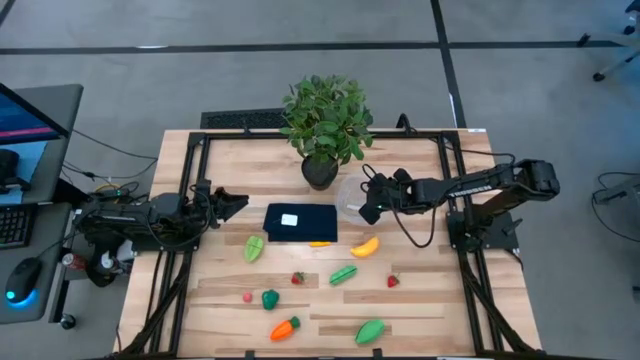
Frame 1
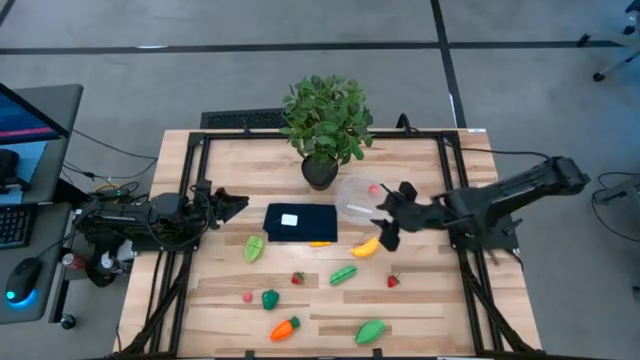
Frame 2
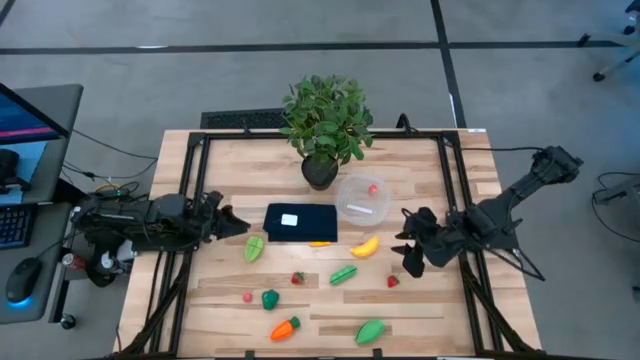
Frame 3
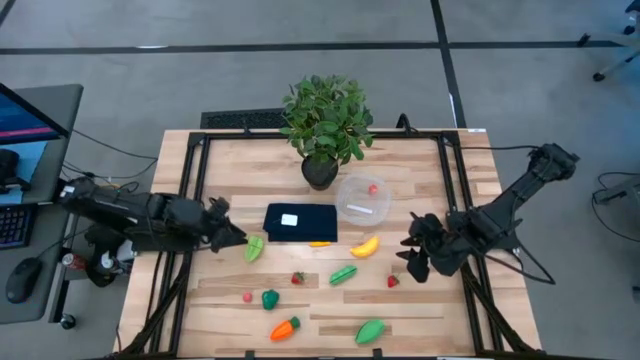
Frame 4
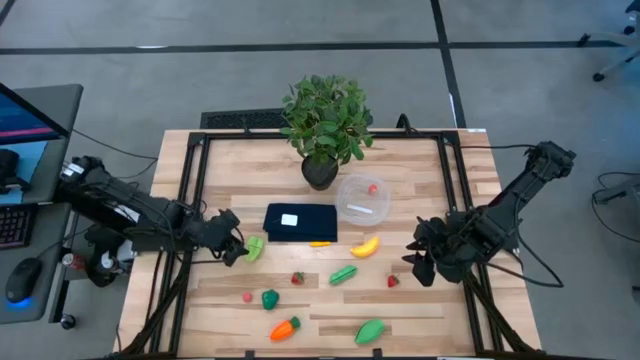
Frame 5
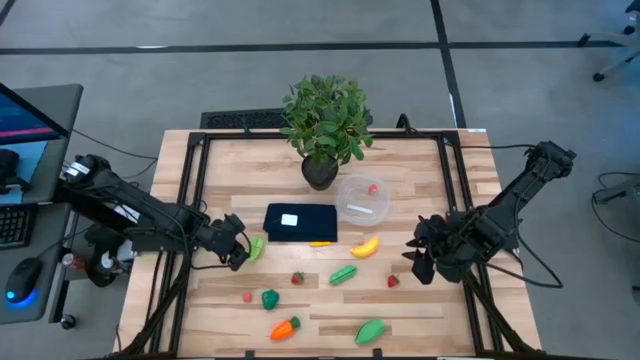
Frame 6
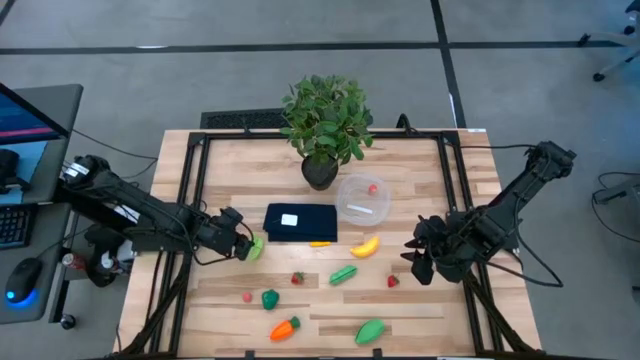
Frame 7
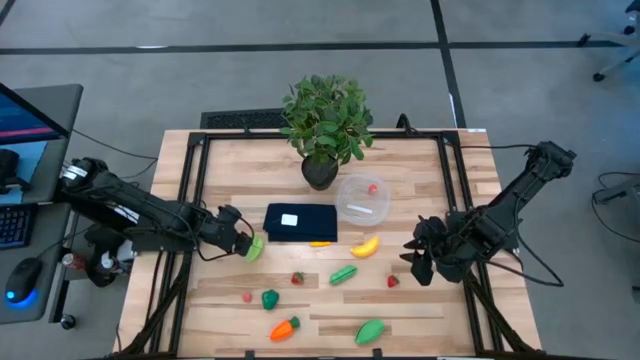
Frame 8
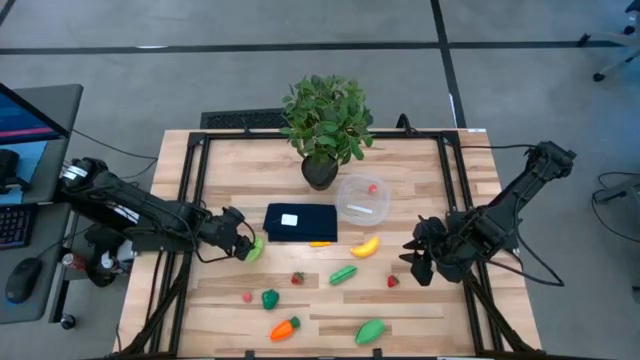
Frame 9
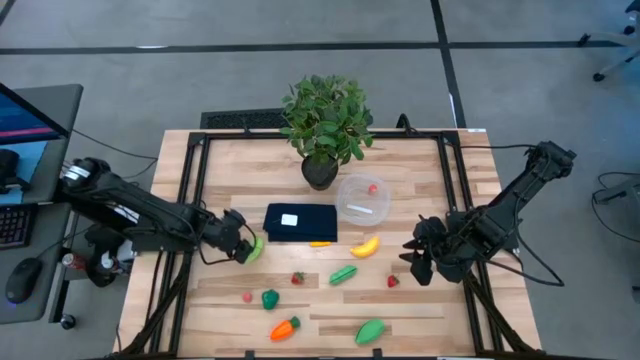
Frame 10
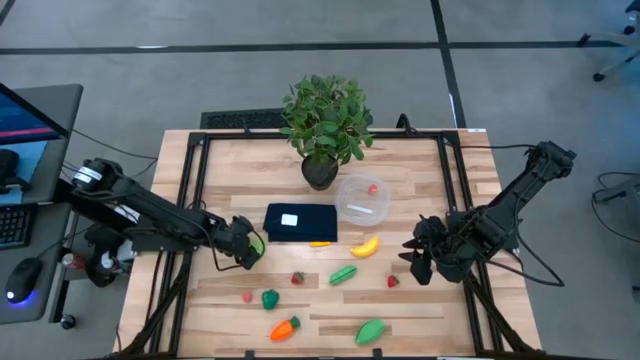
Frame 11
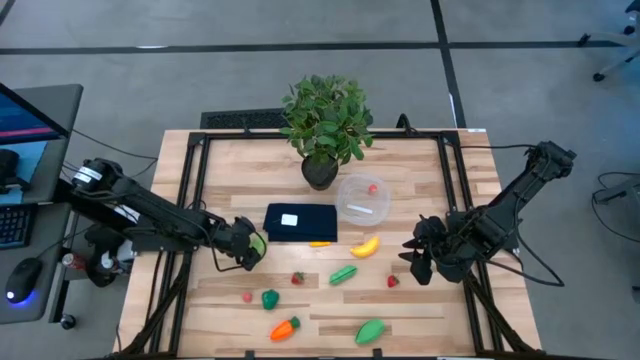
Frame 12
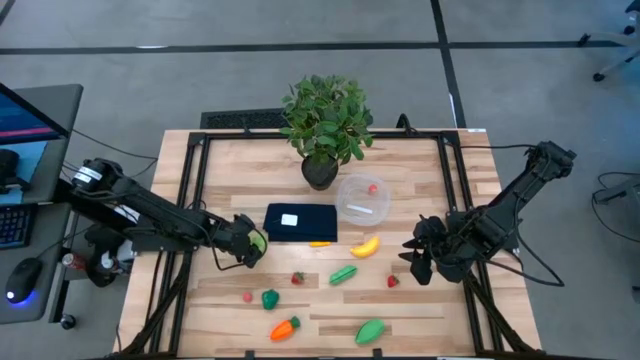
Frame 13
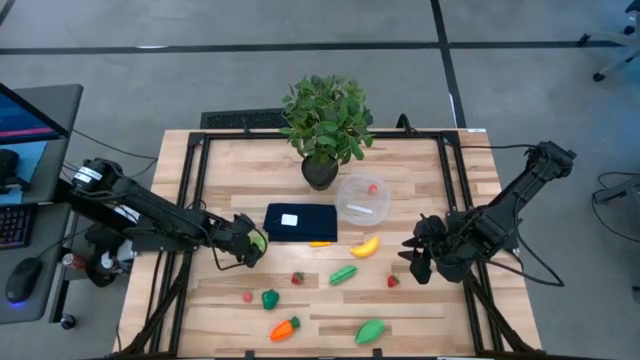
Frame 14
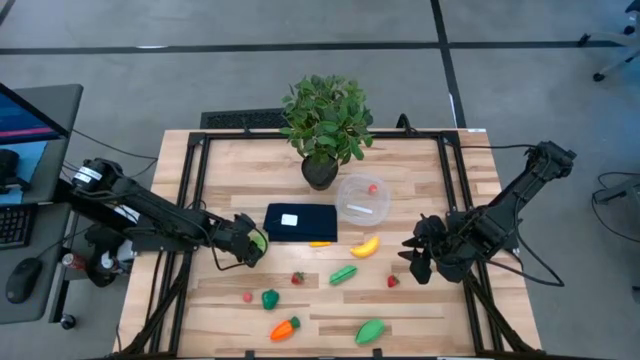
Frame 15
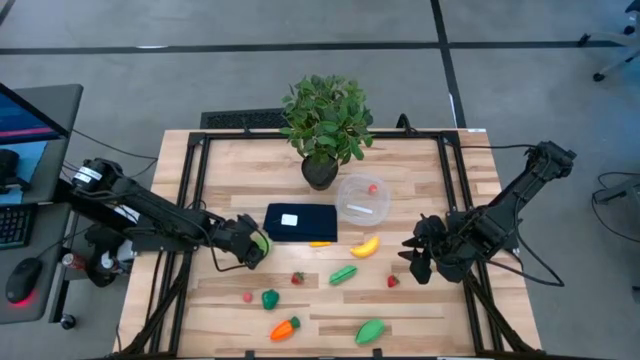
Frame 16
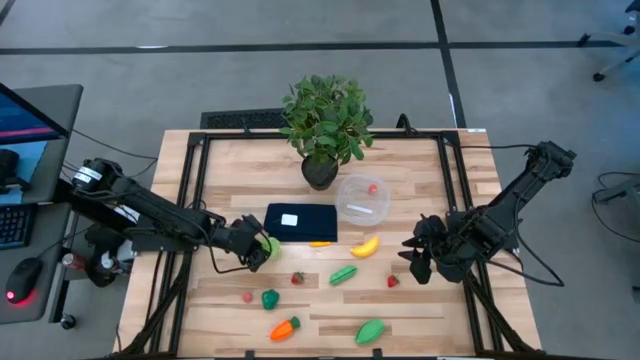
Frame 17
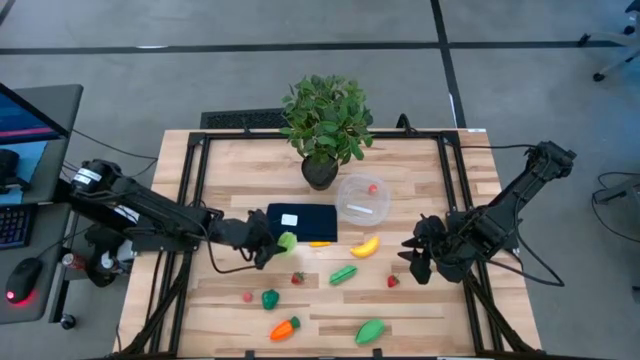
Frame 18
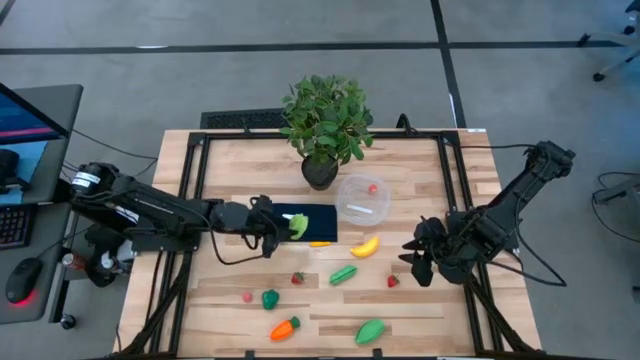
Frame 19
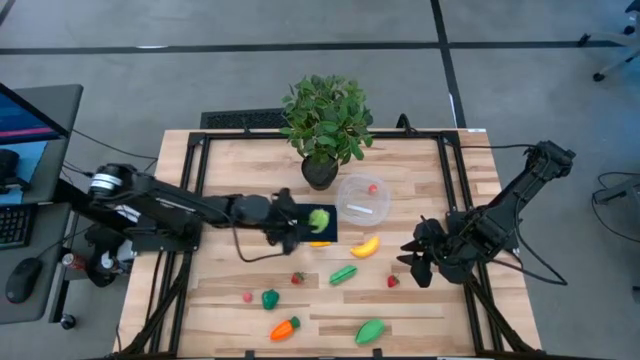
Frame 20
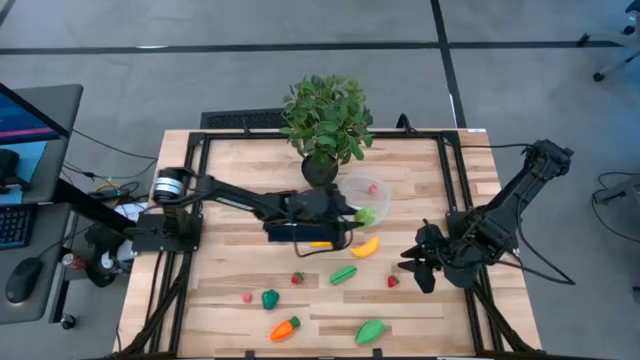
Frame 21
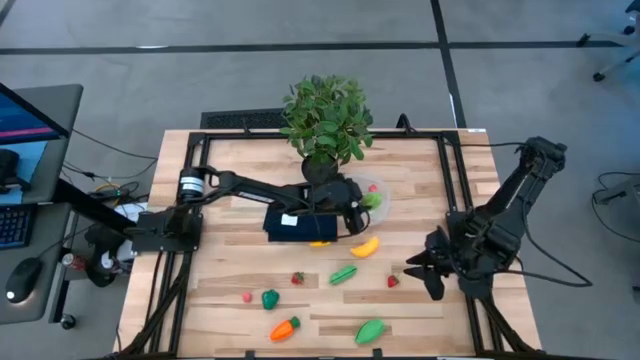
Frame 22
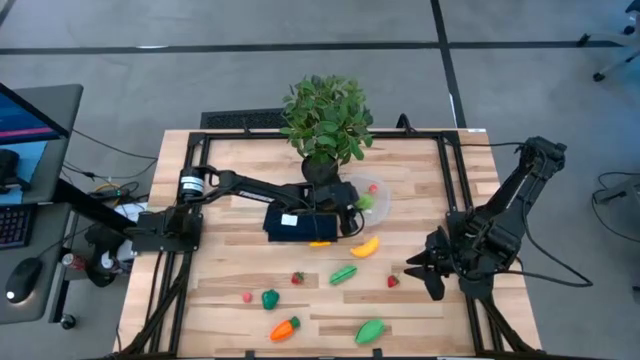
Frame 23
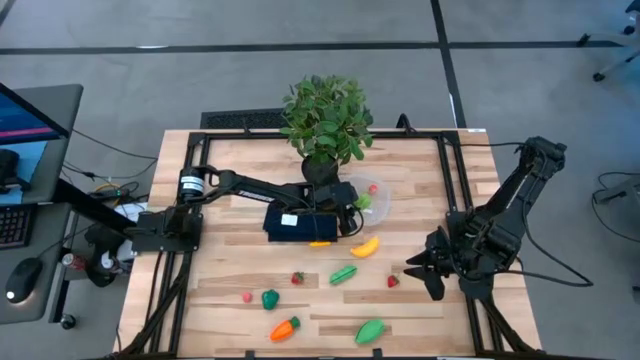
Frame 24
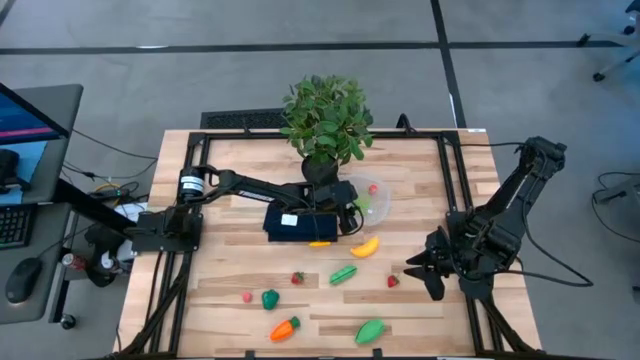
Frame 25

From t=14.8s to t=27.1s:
Task: Pick and placing Produce into tupperware
Put the green star fruit into the transparent container

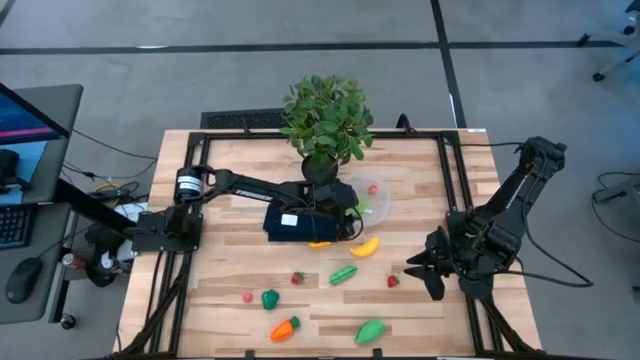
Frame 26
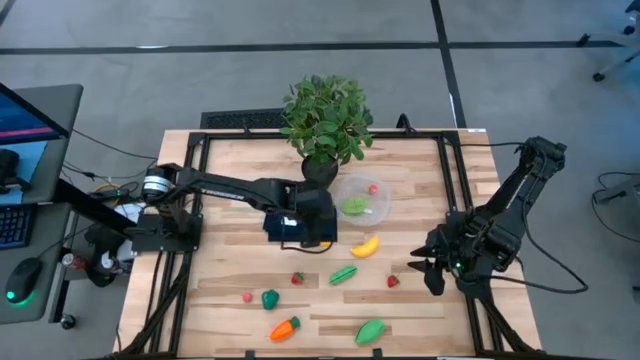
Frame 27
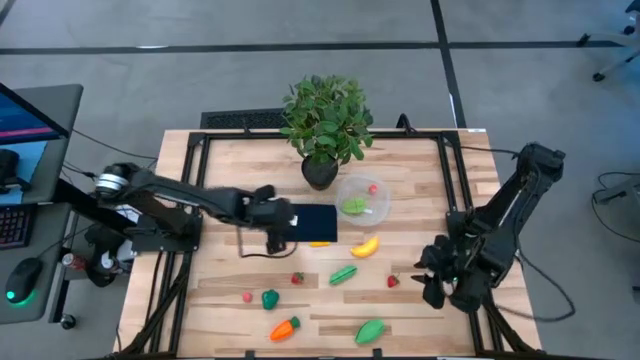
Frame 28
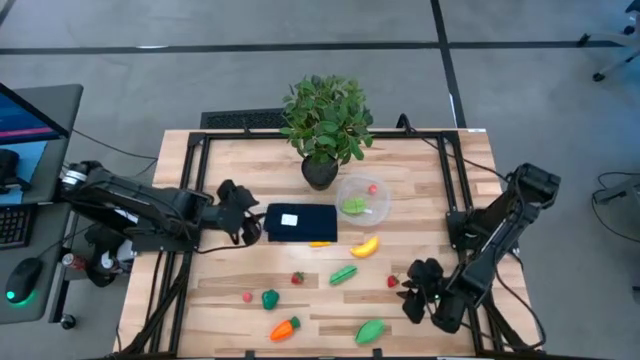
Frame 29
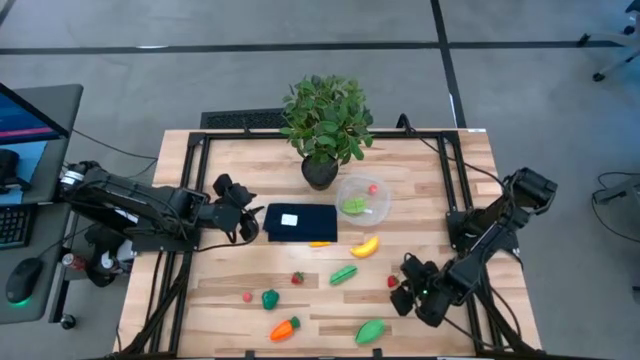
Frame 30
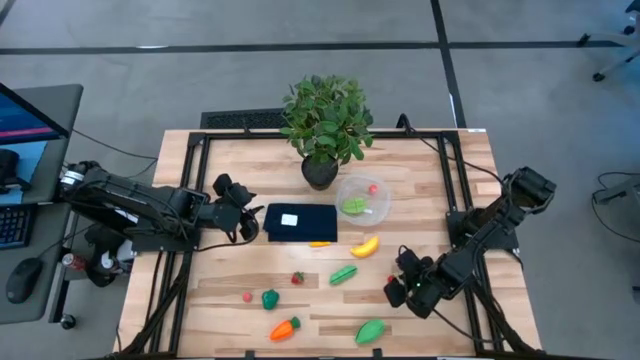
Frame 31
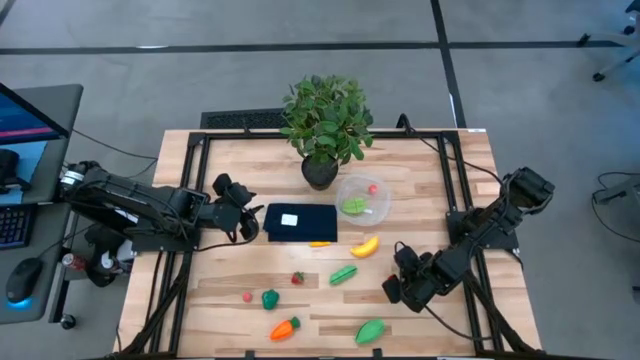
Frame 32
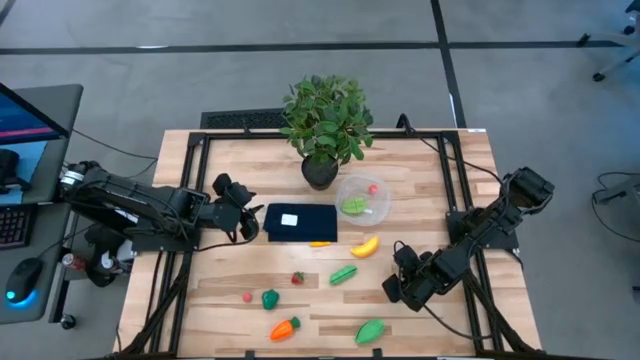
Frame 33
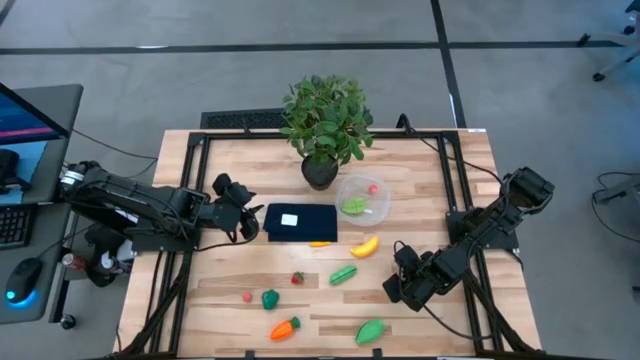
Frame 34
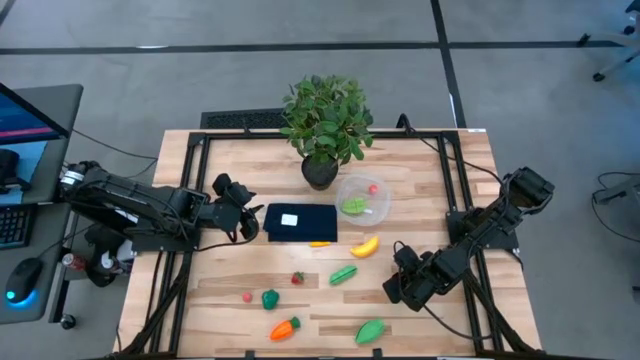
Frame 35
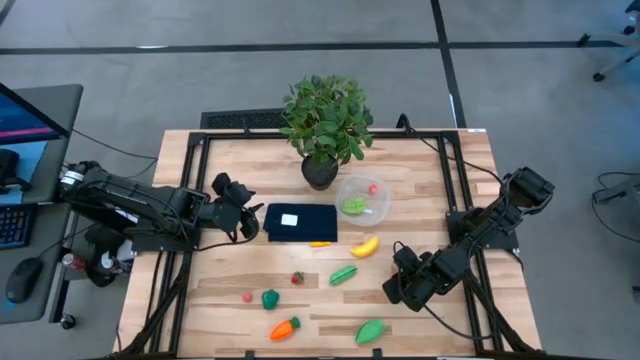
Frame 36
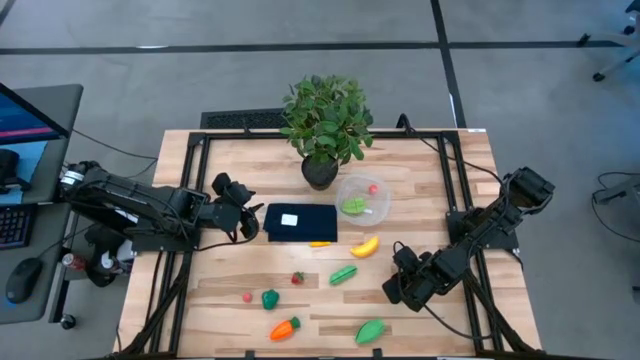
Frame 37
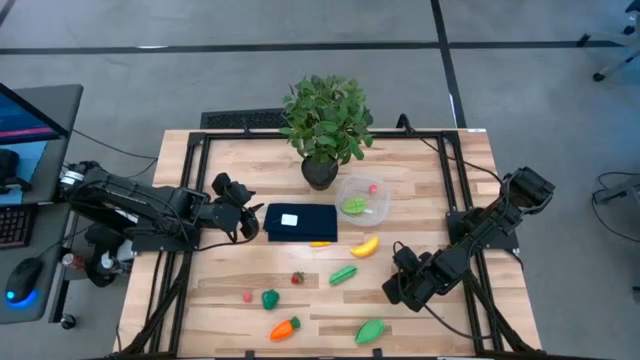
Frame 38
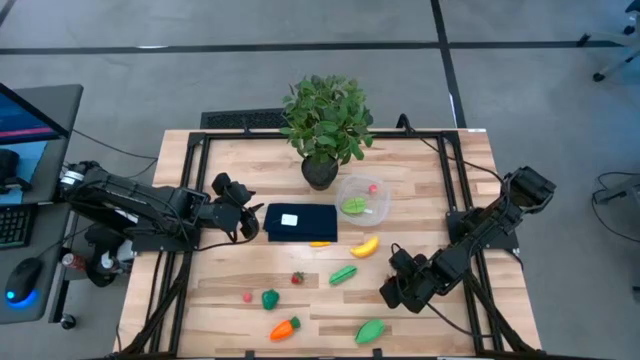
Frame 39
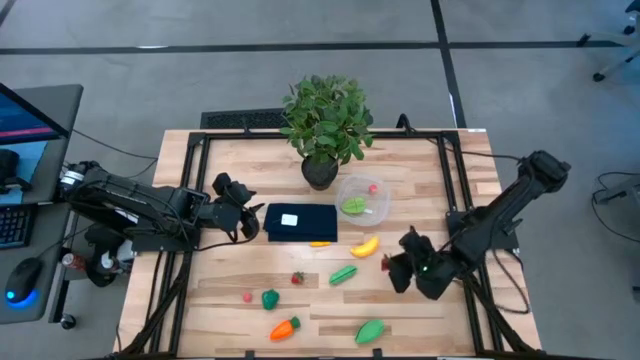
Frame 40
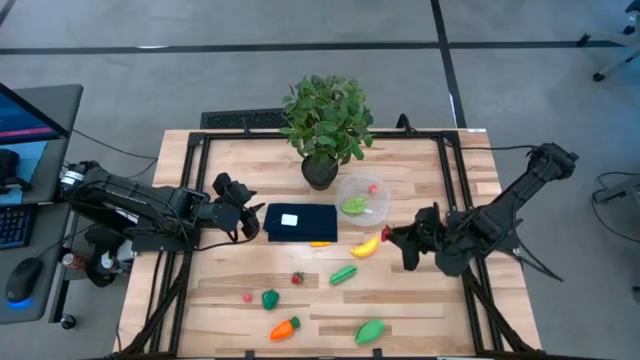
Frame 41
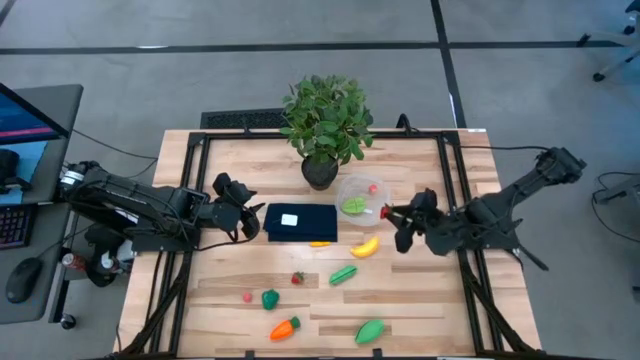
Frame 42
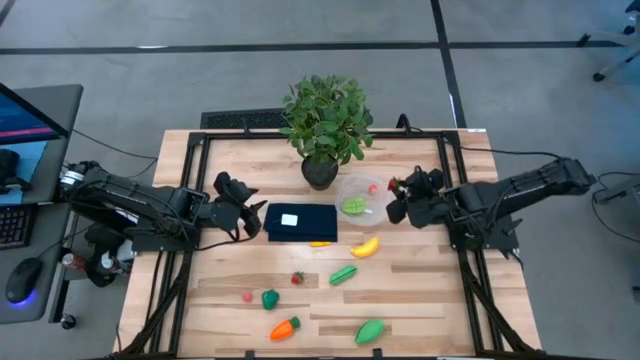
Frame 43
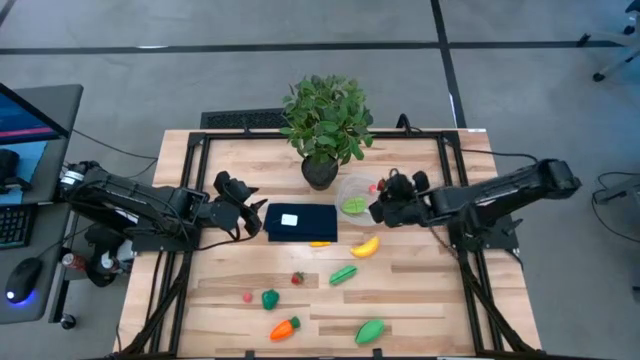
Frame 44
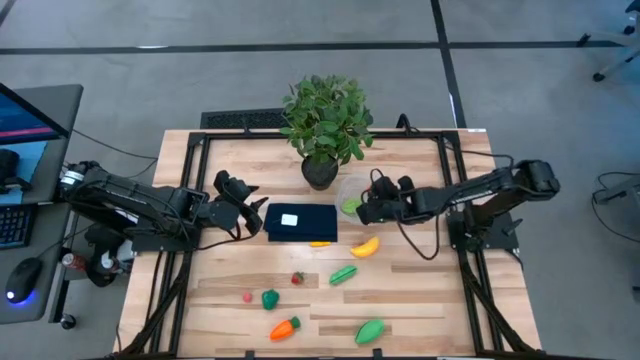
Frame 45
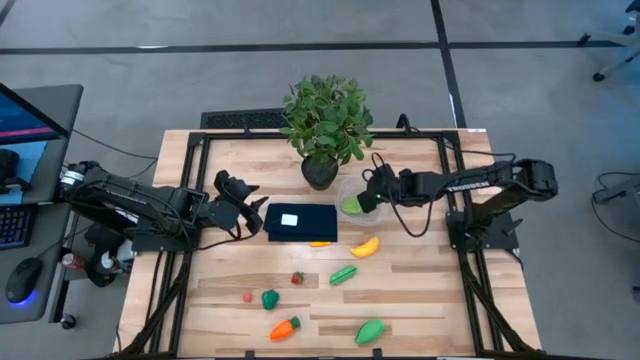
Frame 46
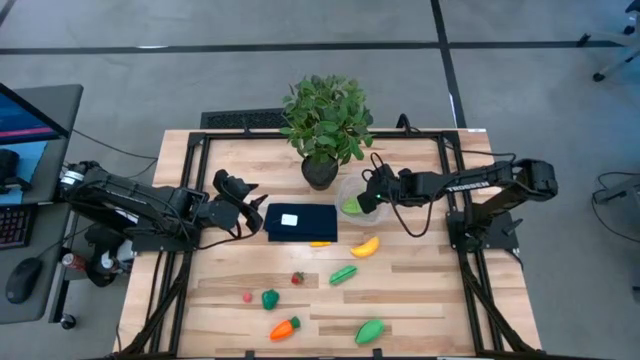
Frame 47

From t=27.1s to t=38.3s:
Put the red strawberry into the transparent container
